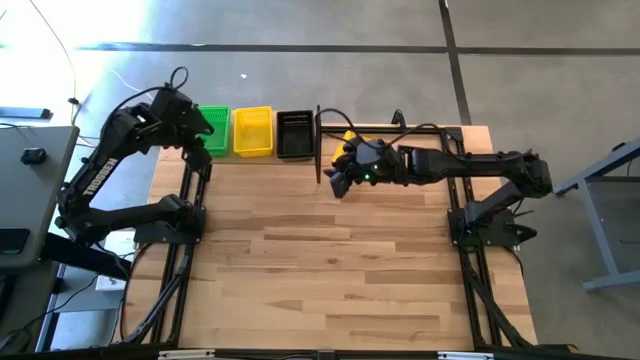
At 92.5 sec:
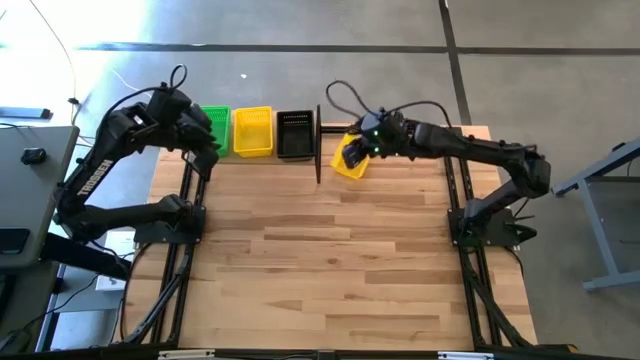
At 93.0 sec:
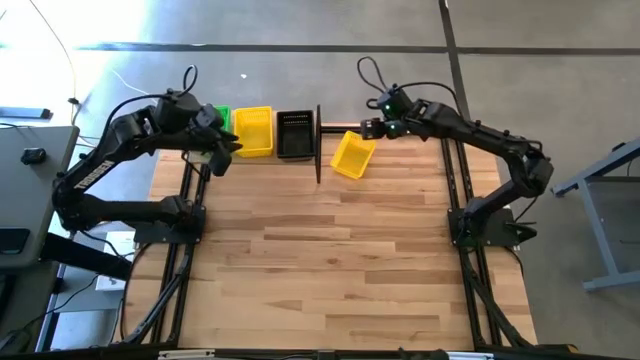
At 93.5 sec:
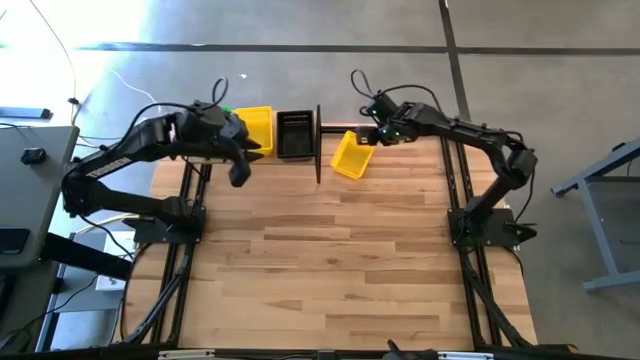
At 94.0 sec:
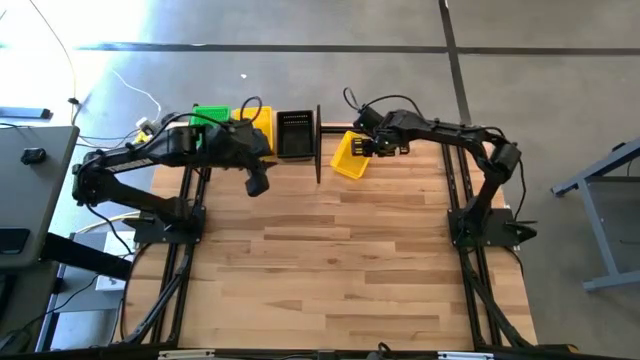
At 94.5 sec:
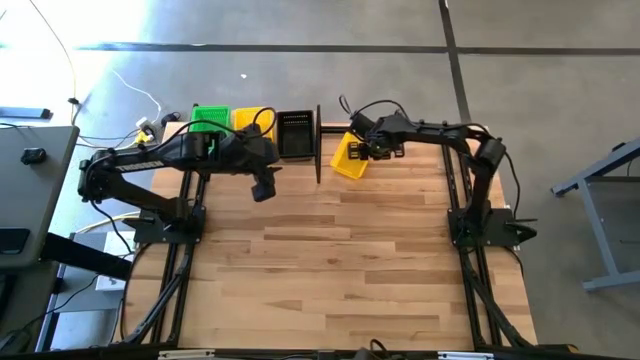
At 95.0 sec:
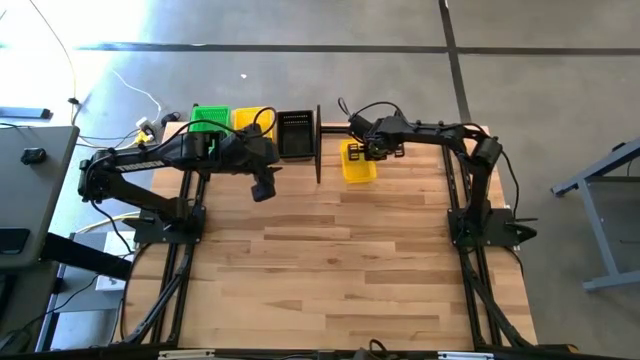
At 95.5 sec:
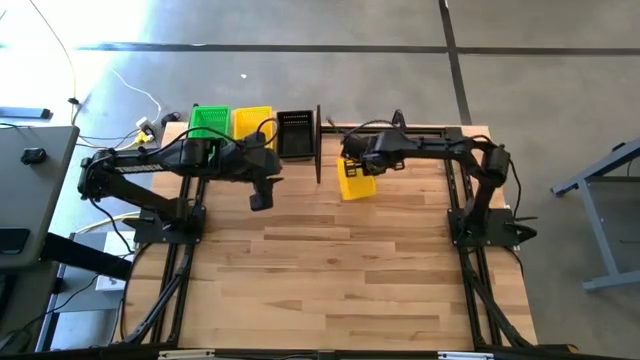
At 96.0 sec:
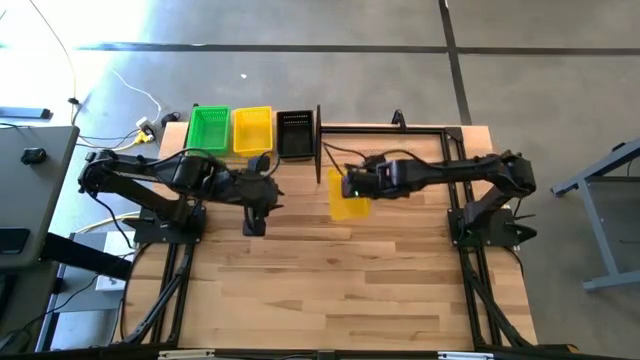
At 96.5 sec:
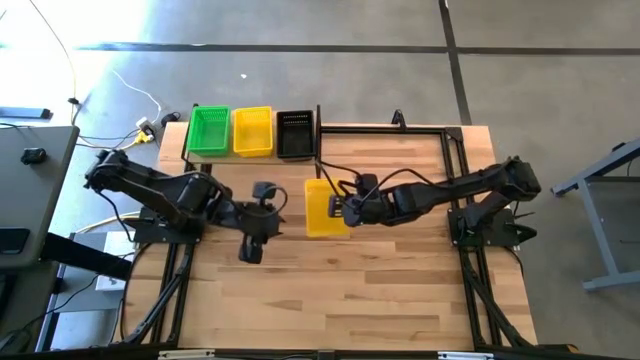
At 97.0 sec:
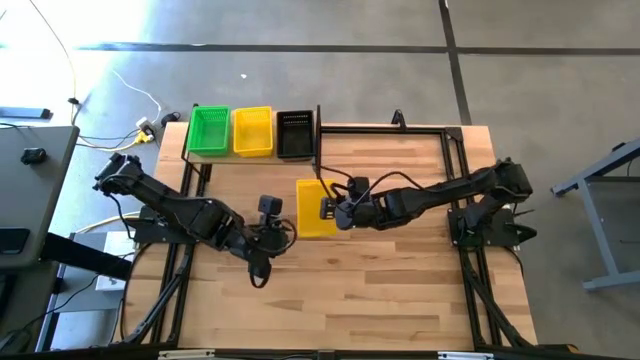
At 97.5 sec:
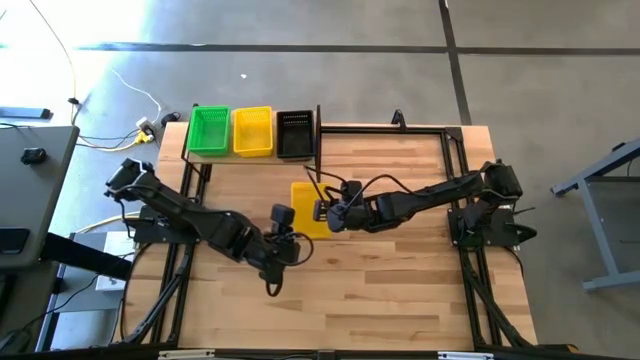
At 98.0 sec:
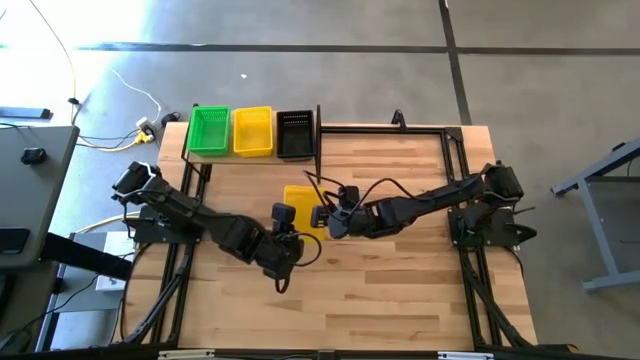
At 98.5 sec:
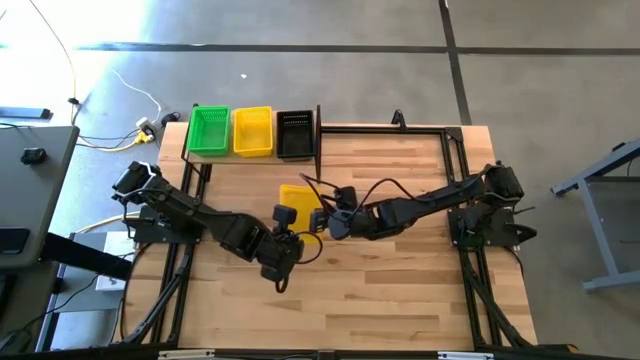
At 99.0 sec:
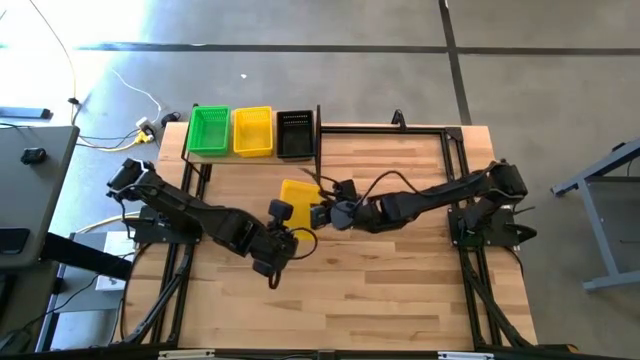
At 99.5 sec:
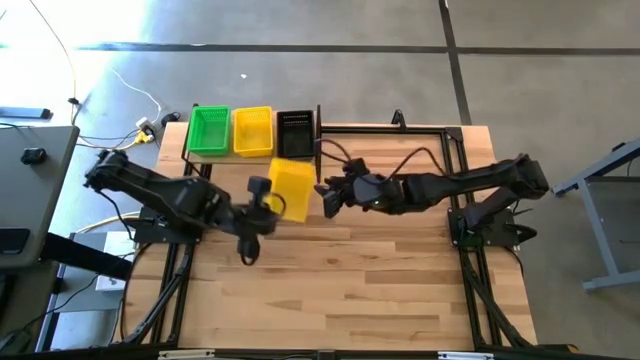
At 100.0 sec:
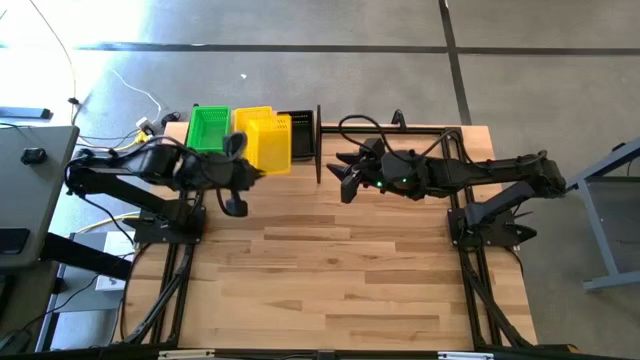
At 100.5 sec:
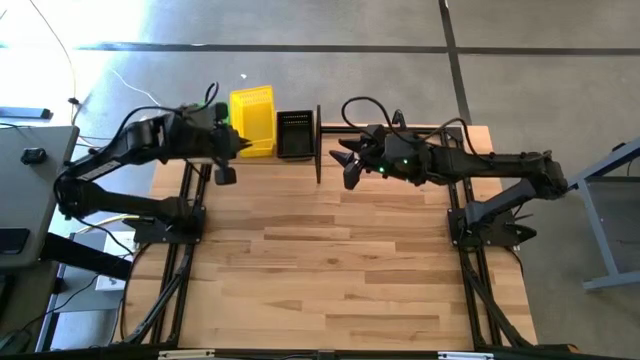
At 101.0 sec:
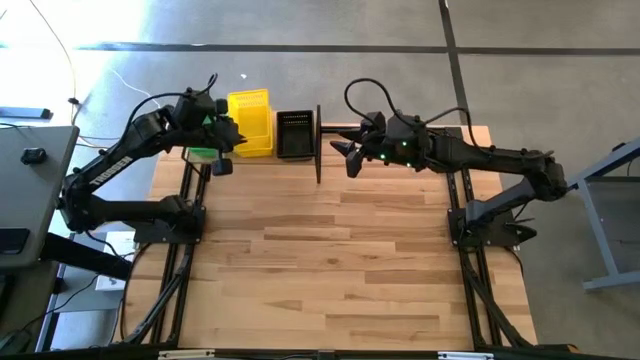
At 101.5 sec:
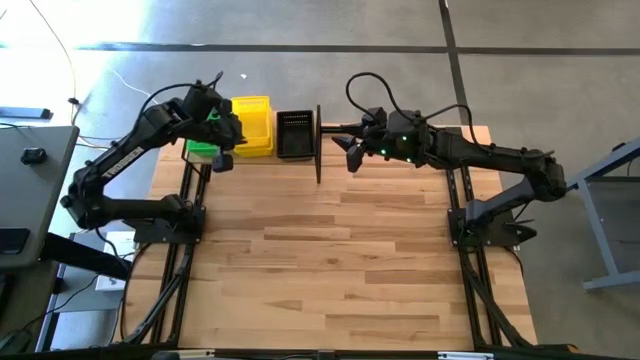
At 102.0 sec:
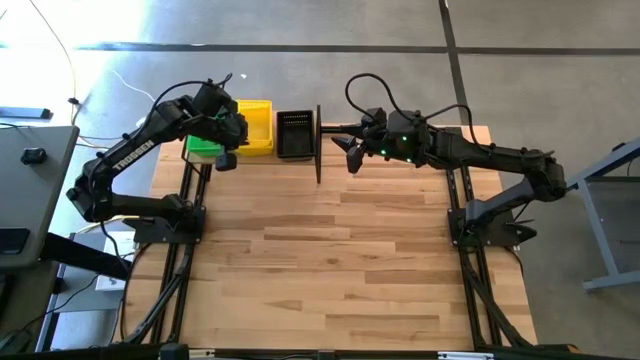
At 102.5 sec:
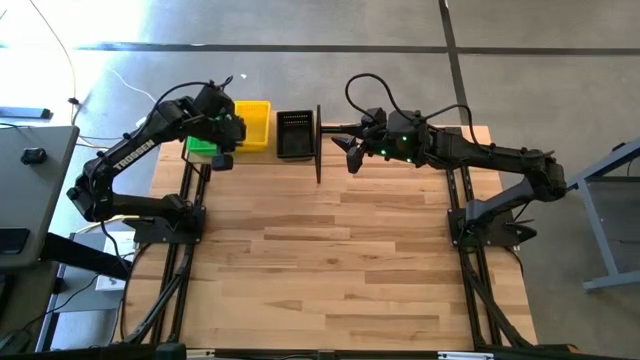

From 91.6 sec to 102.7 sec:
Task: Stack baskets on shelf by color
Stack the yellow bin on top of the yellow bin on the shelf

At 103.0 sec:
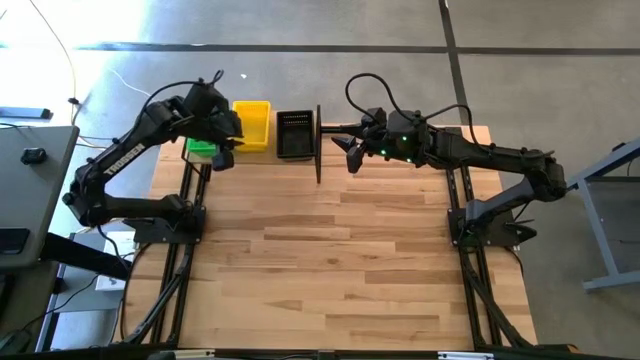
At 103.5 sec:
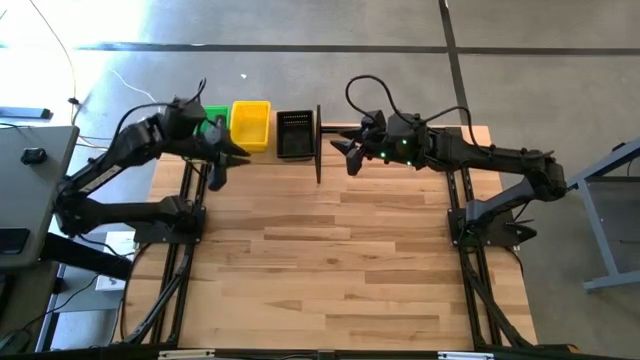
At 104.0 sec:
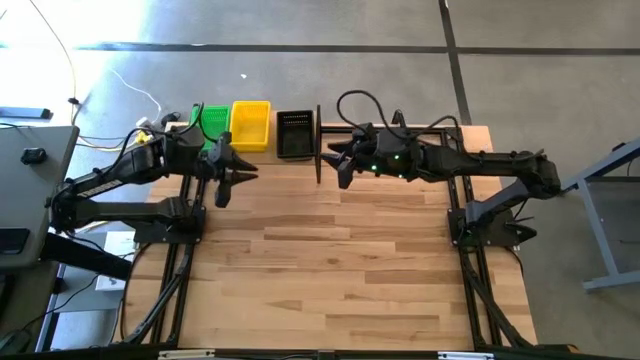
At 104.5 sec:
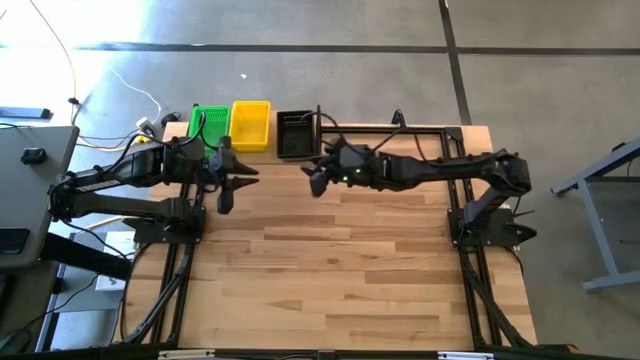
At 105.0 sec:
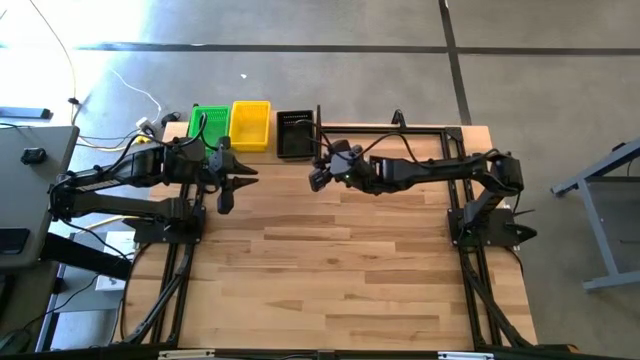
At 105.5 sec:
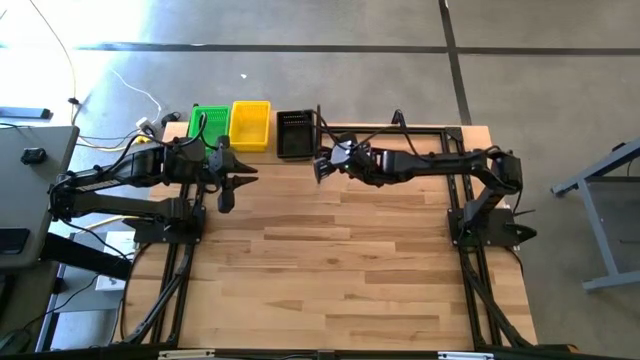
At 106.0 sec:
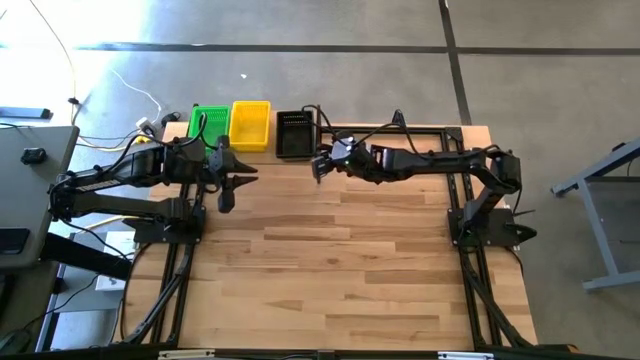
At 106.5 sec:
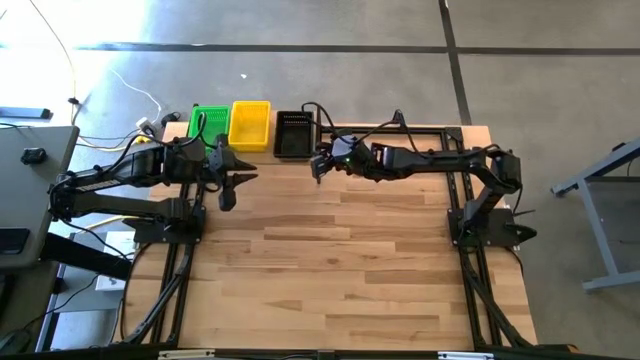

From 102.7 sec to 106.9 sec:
Adjust the black bins

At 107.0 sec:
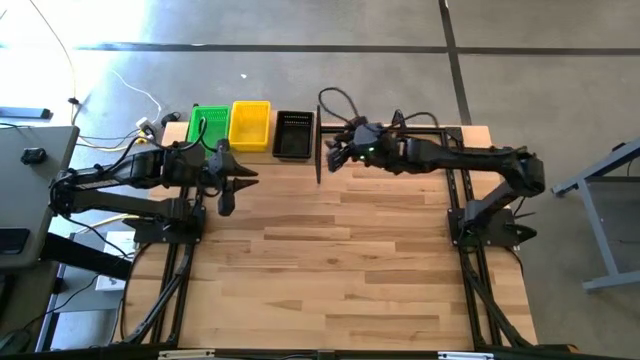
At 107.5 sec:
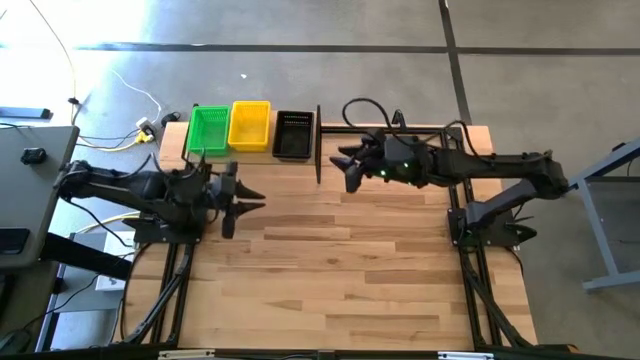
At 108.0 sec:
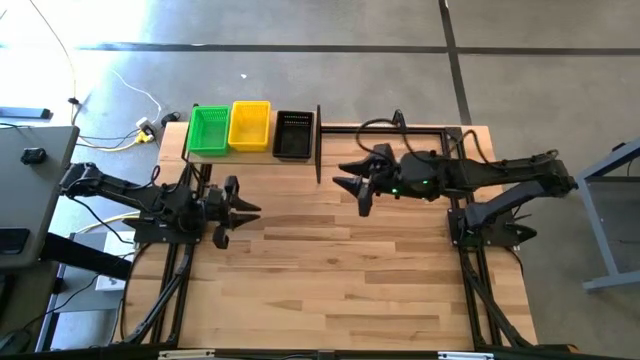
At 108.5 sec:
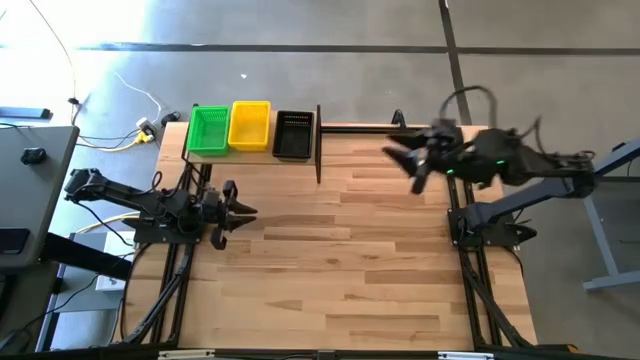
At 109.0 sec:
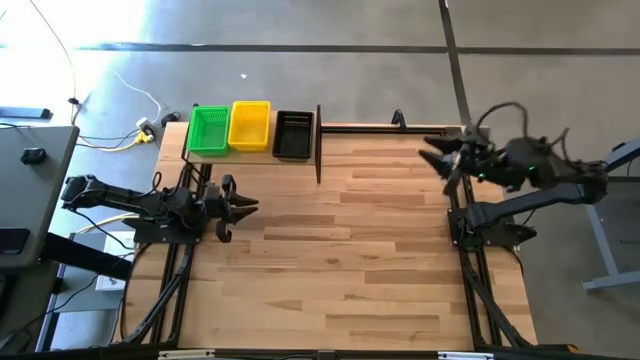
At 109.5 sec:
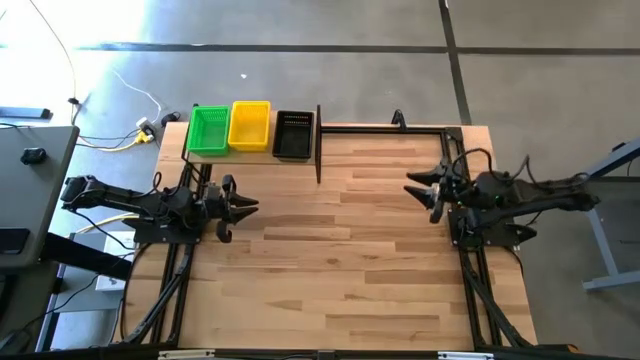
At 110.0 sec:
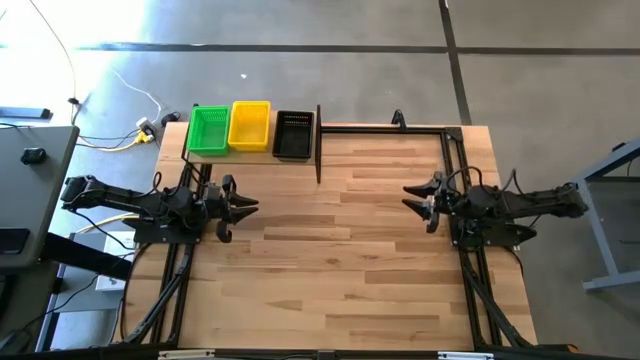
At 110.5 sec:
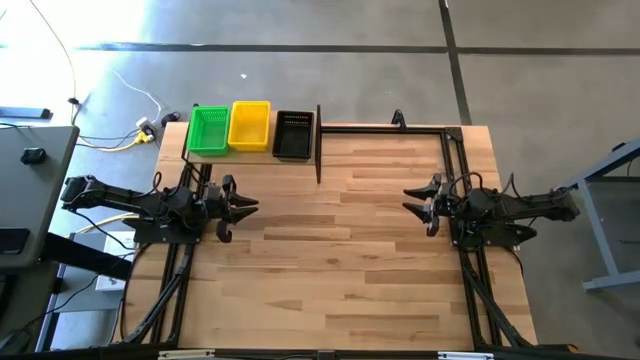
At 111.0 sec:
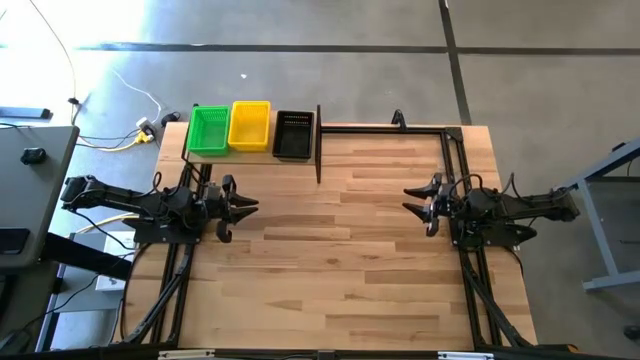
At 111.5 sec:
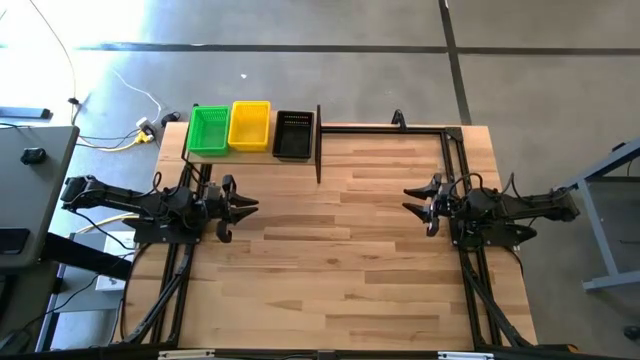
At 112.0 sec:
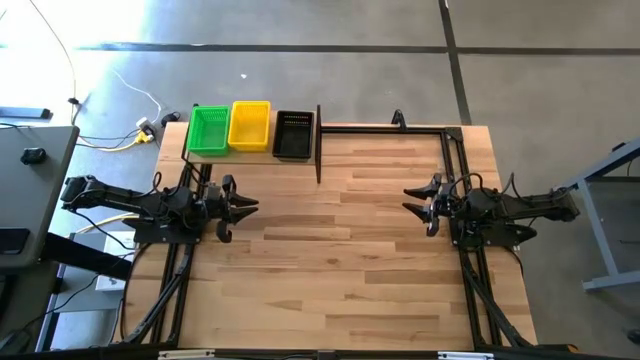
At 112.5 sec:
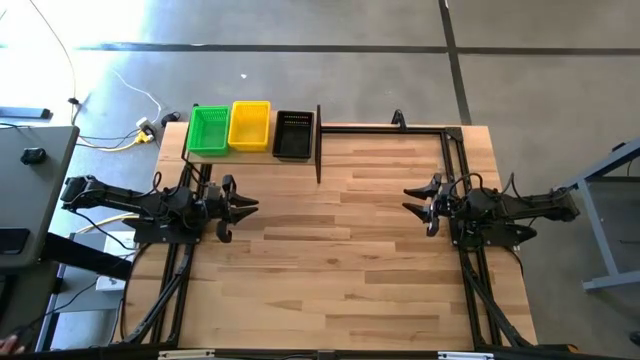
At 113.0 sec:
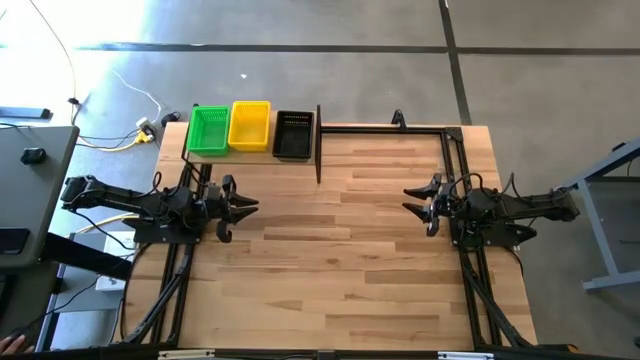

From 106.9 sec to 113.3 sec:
Return to Home Position
